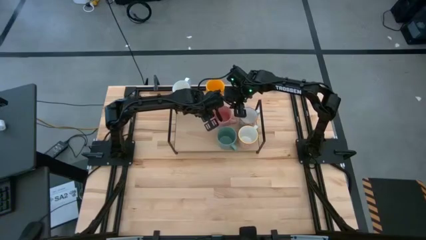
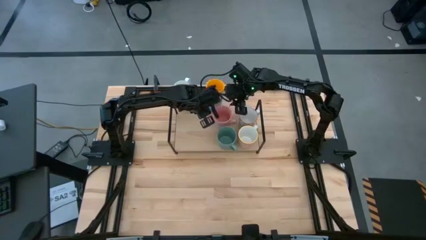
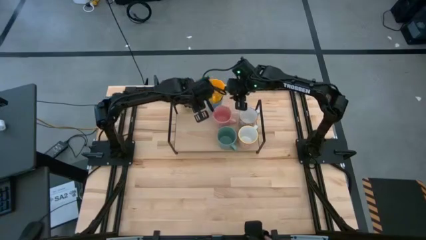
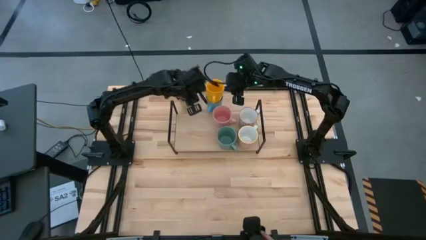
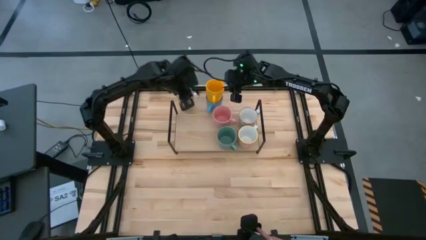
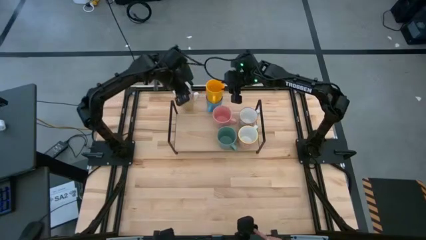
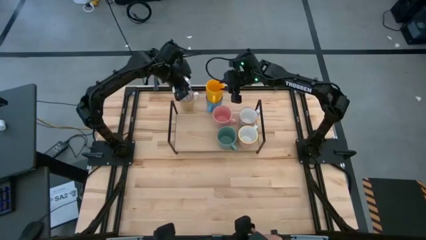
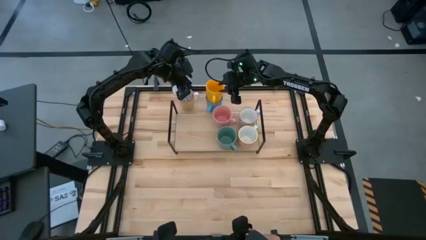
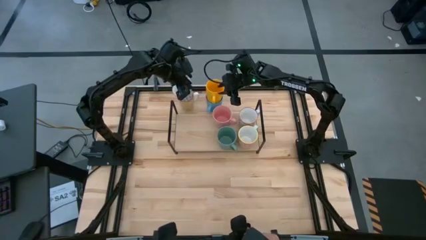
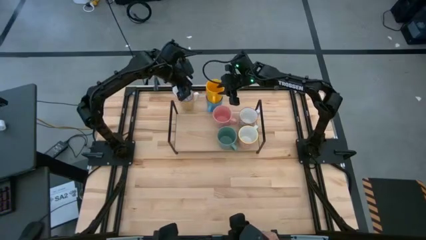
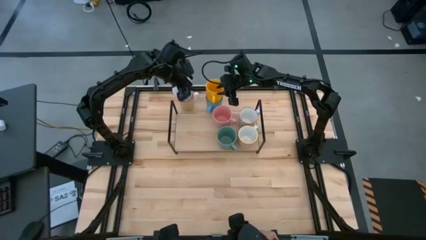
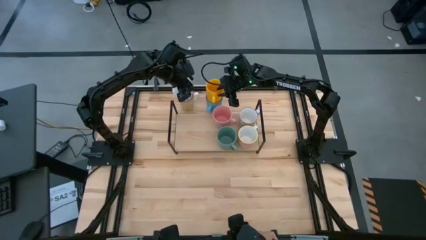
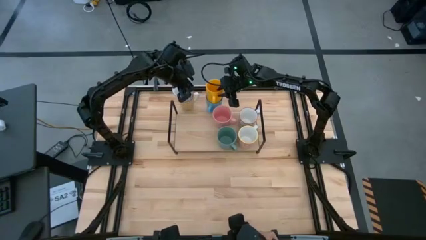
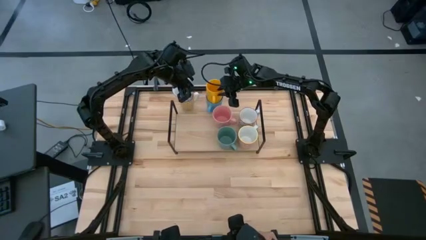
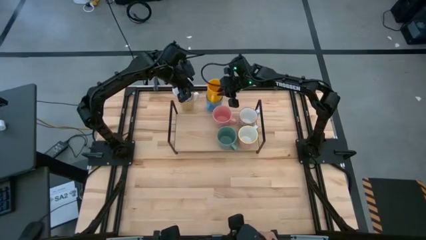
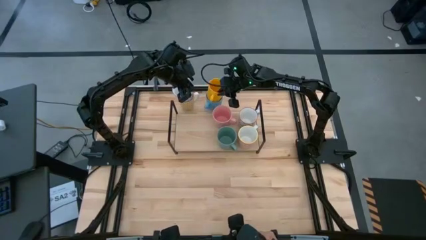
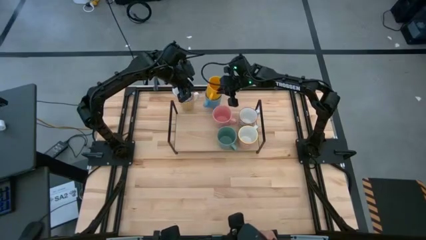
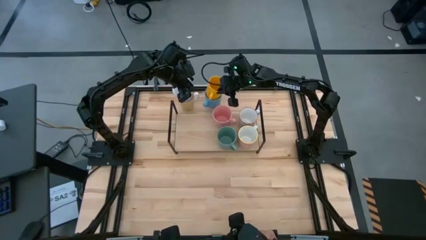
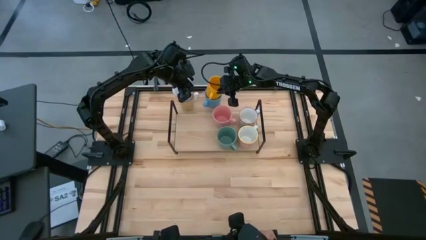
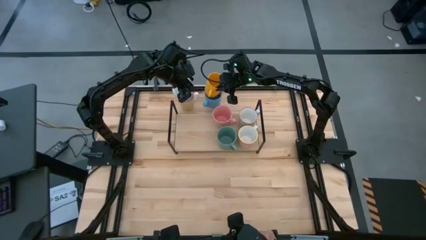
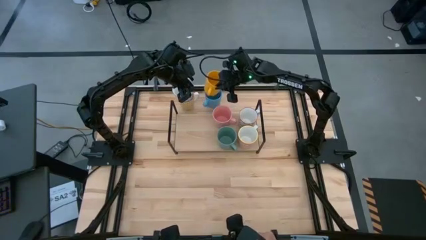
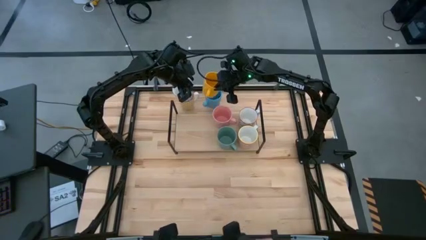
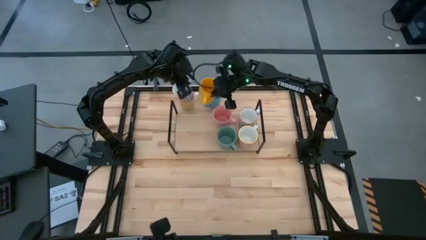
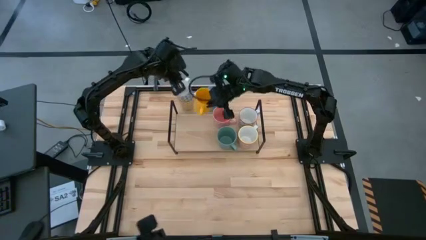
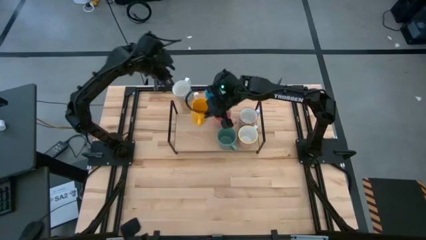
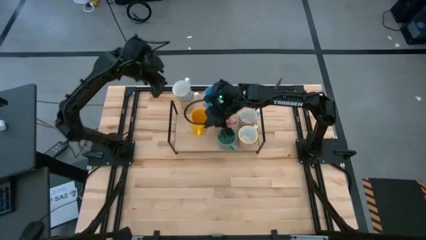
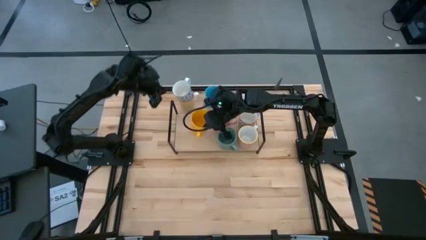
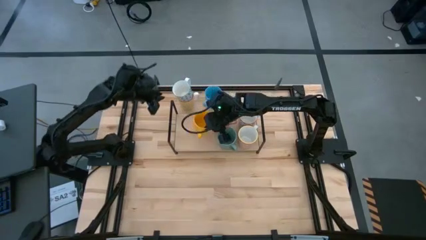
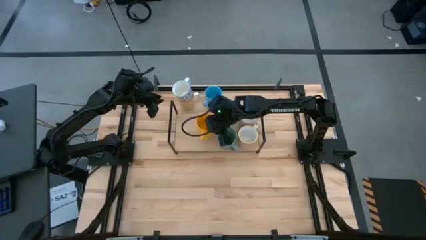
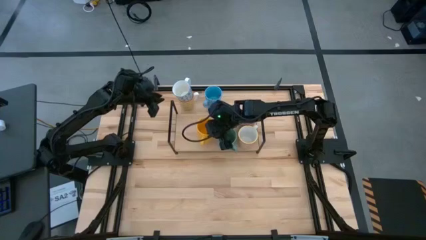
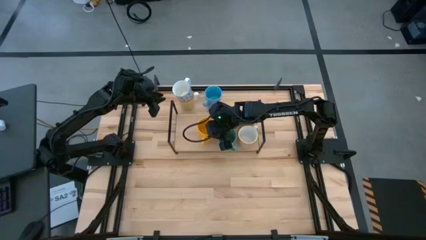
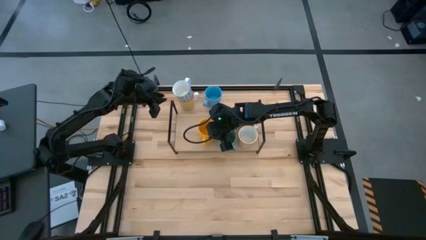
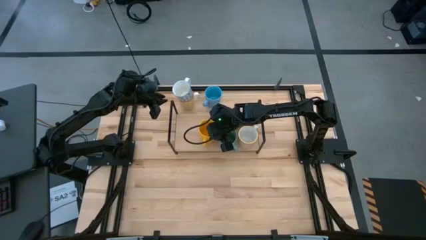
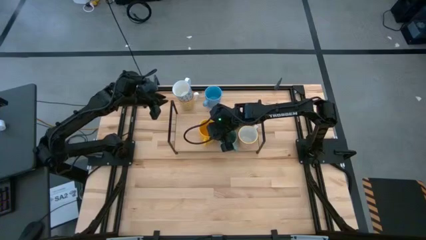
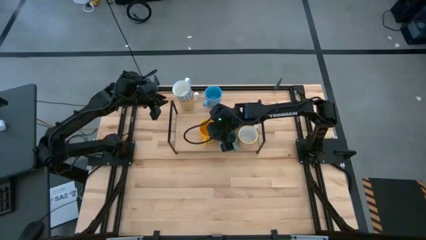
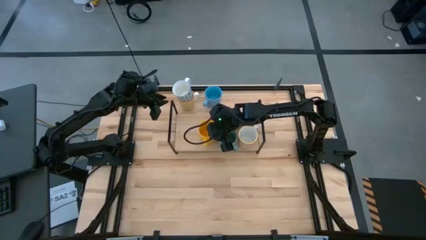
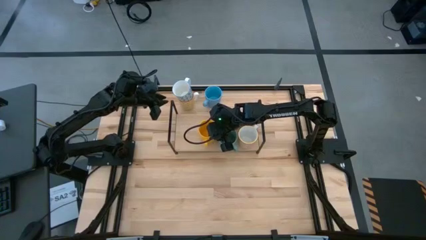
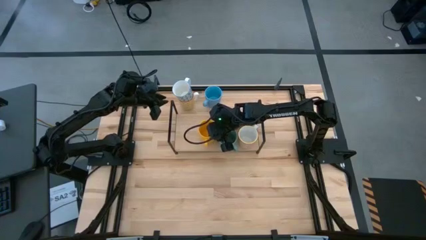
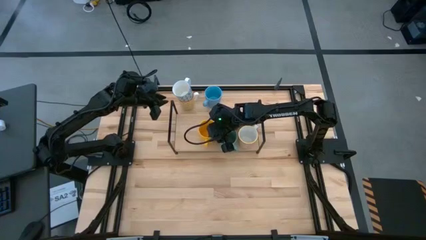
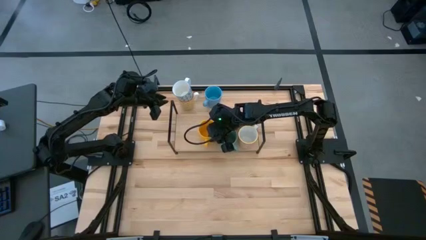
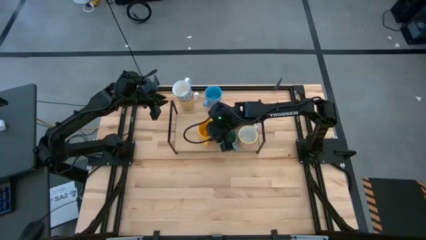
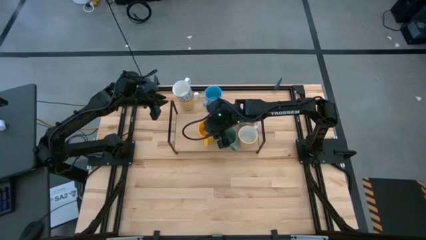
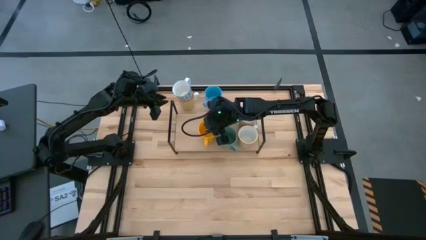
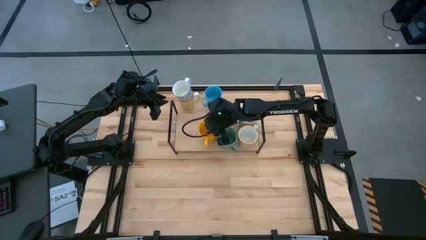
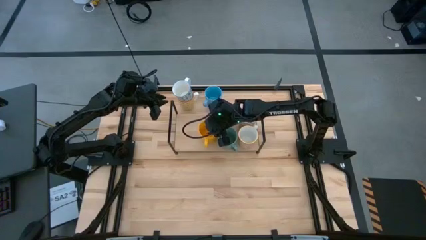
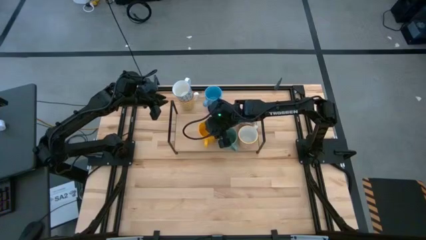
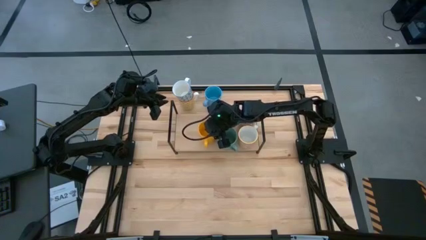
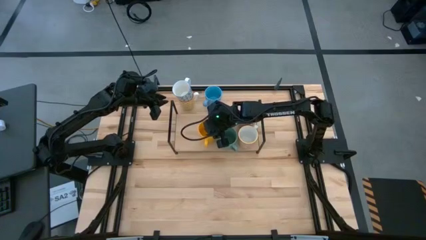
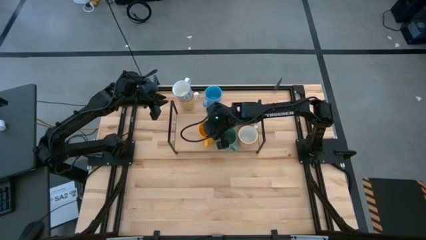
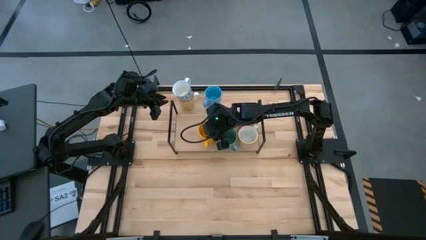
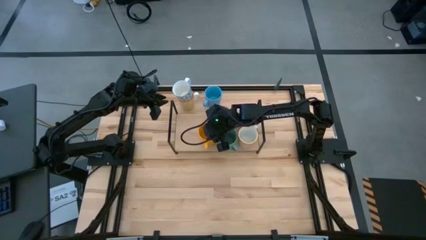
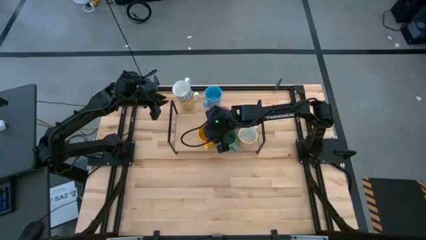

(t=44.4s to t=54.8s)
Task: Place coffee mugs
Put the yellow mug on the shelf

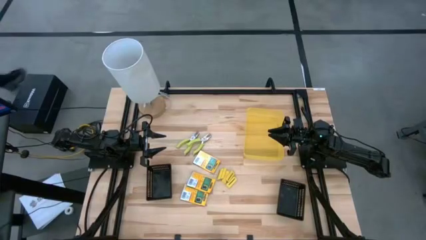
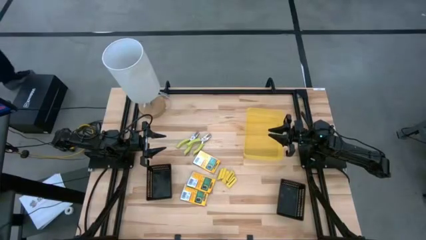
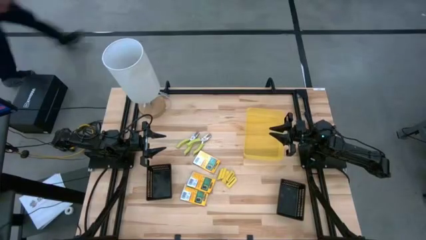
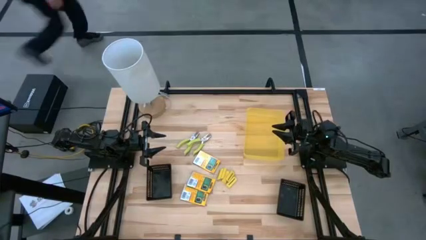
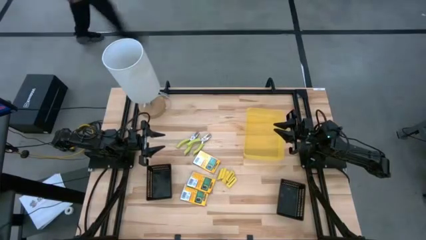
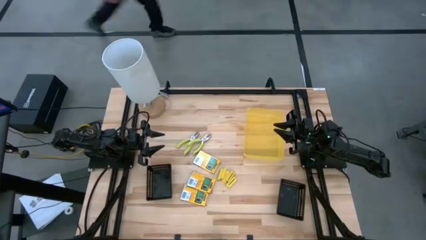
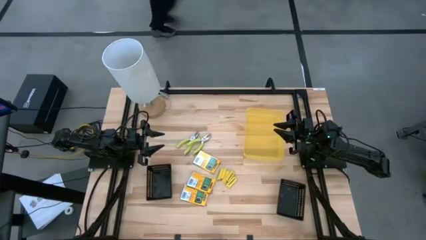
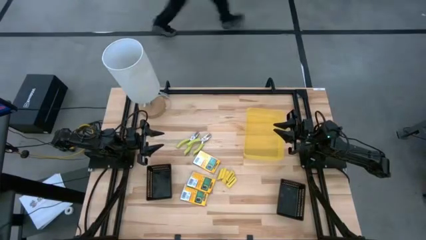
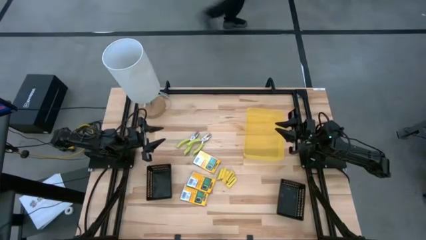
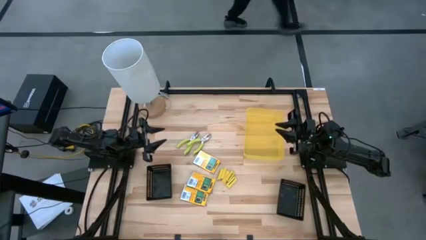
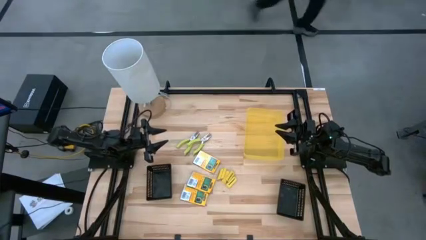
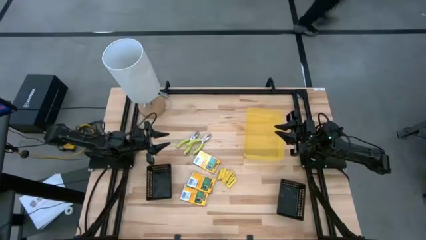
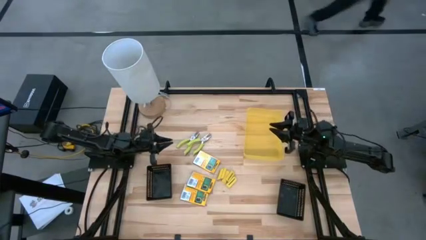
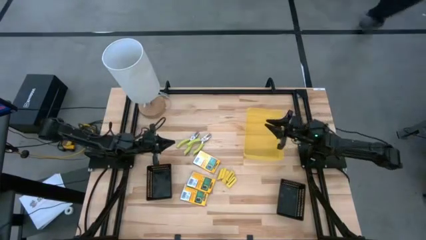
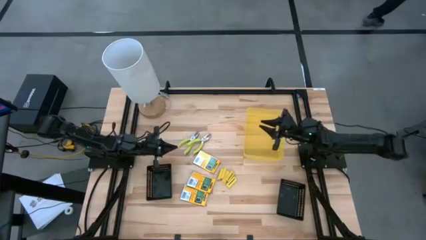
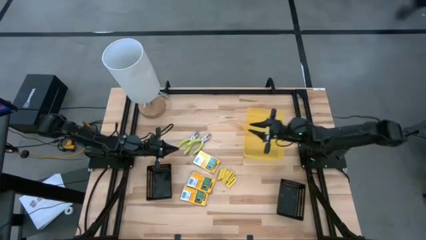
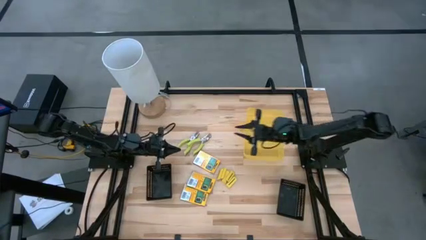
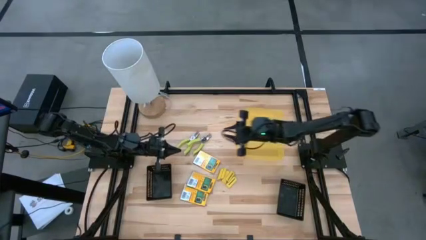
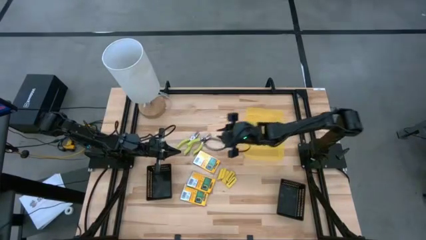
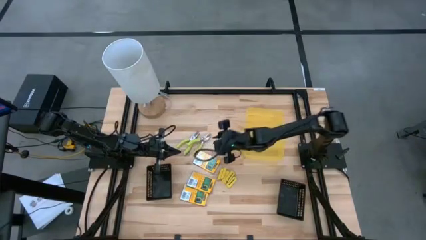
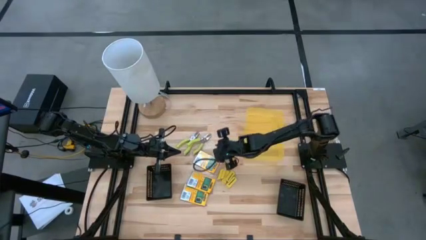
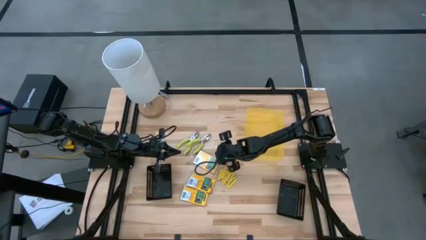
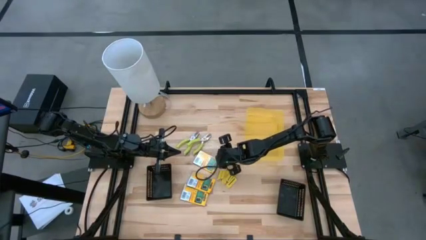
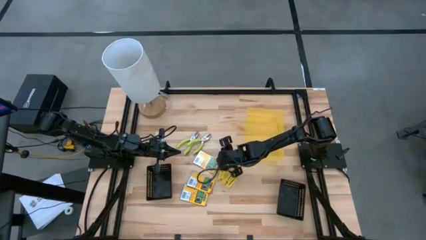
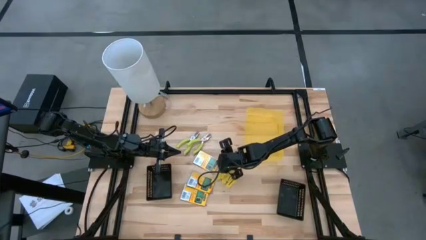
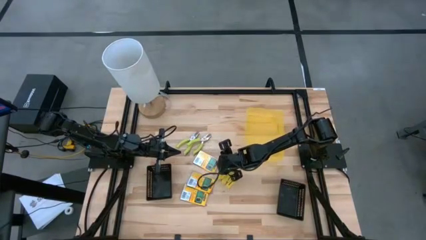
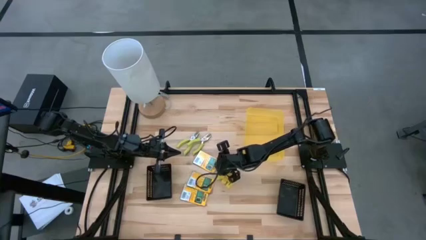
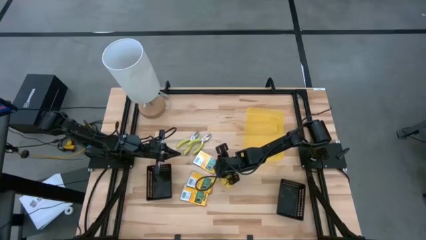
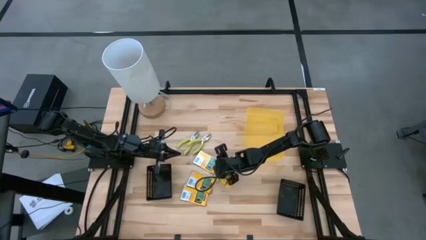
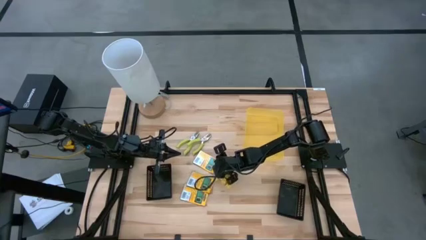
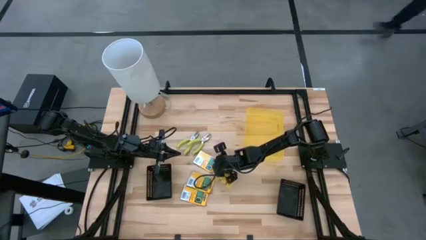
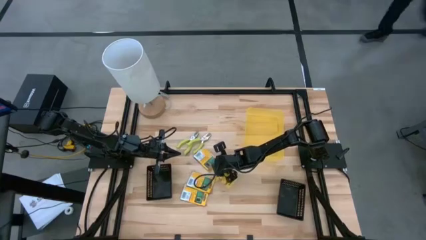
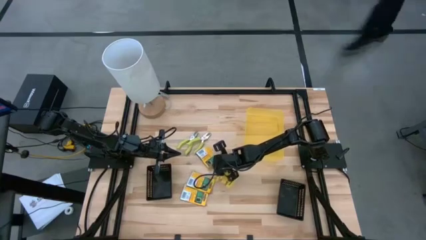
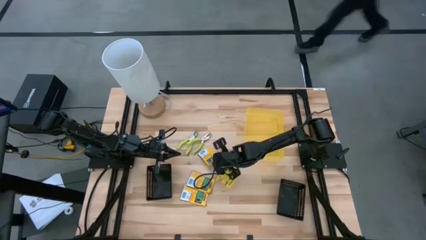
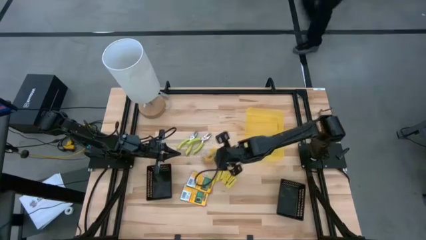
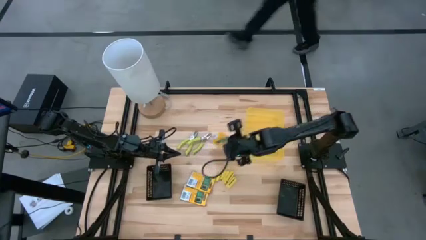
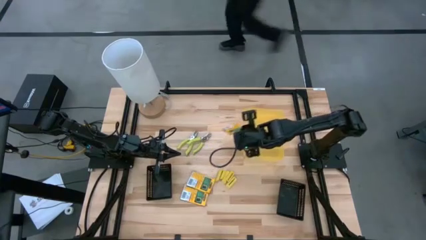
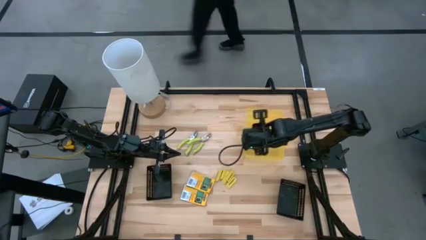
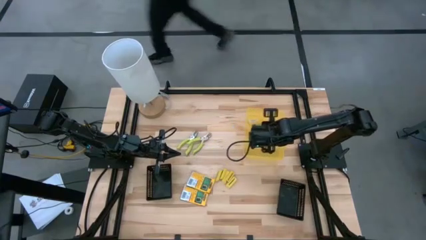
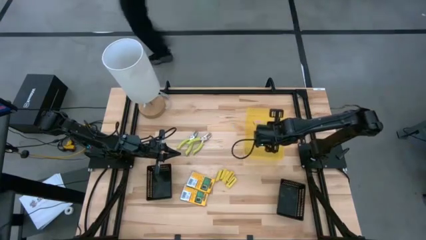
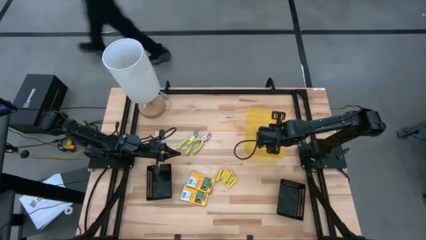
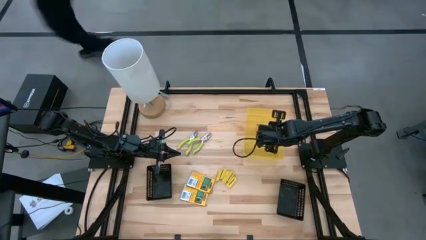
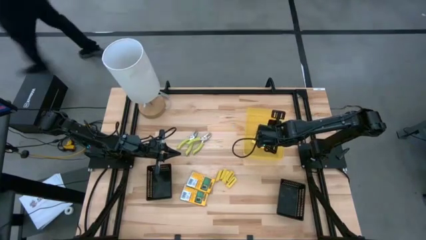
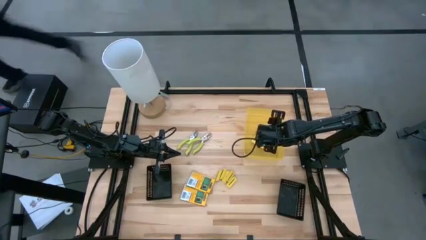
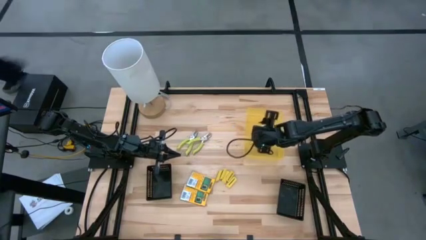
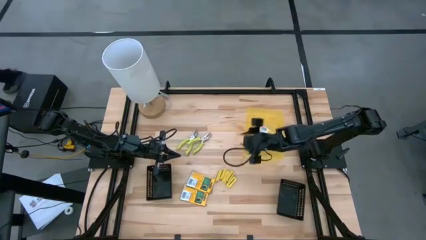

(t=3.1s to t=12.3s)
Task: Pick & Place School Supplies
Put the top crayon box into the yellow bin
